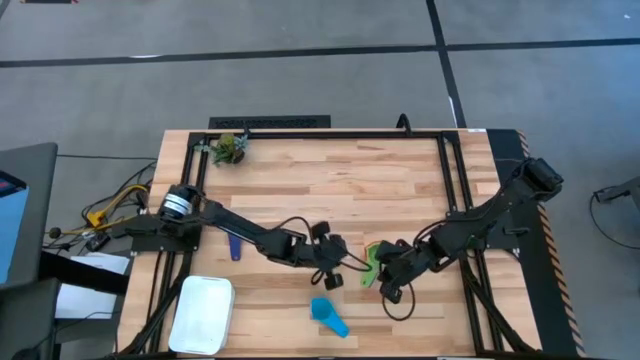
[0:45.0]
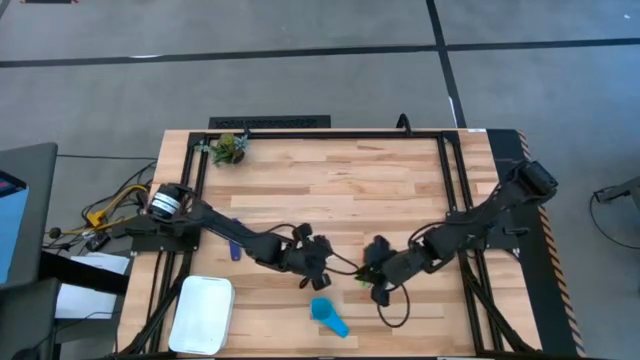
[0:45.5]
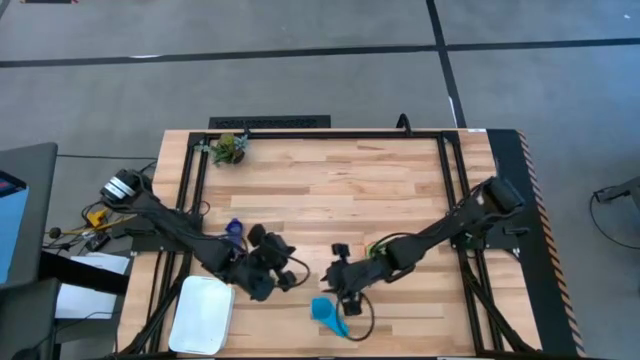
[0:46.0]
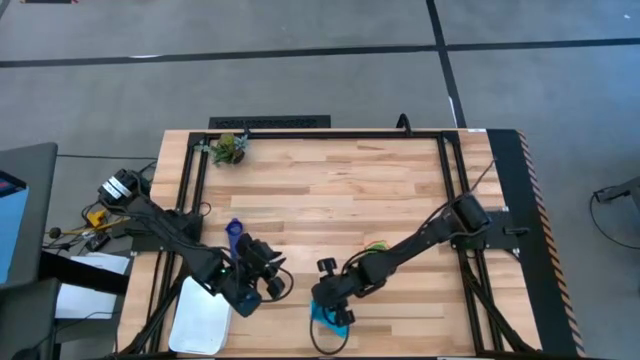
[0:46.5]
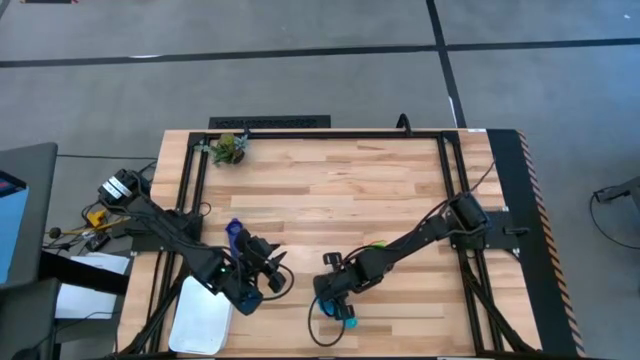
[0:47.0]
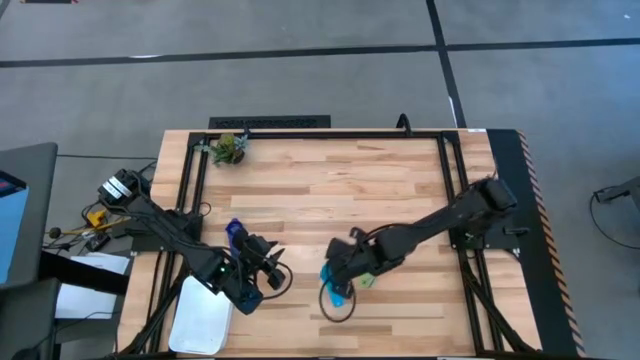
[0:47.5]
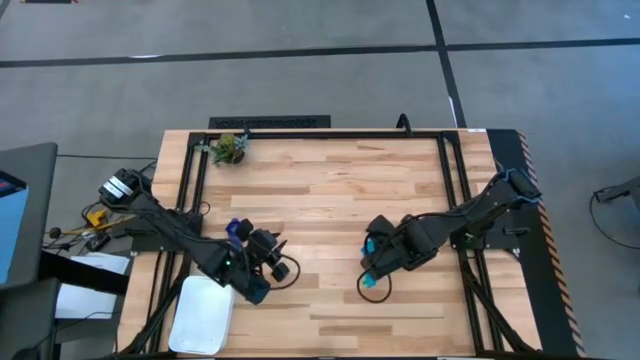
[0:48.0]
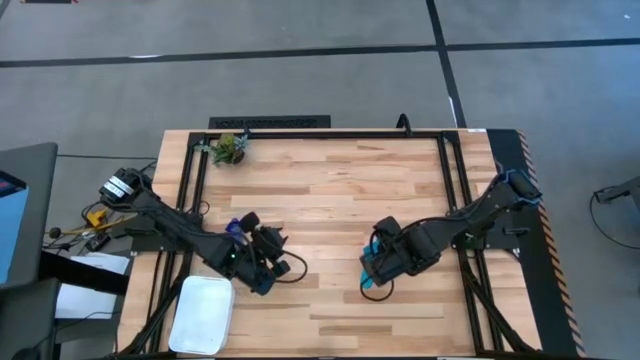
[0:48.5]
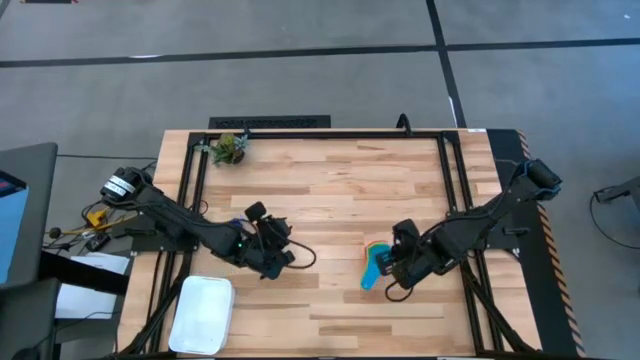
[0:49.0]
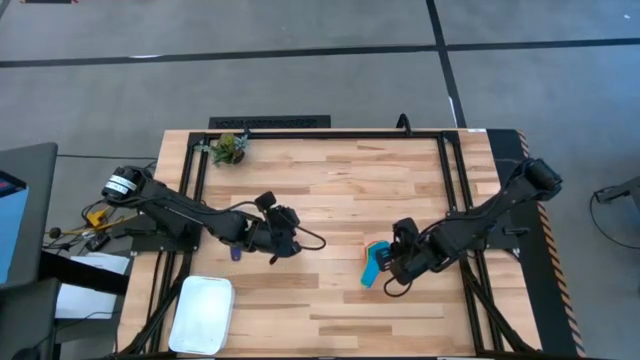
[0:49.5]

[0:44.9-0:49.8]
Task: Nest measuring cups in basket
Stack the light blue measuring cup on top of the green measuring cup

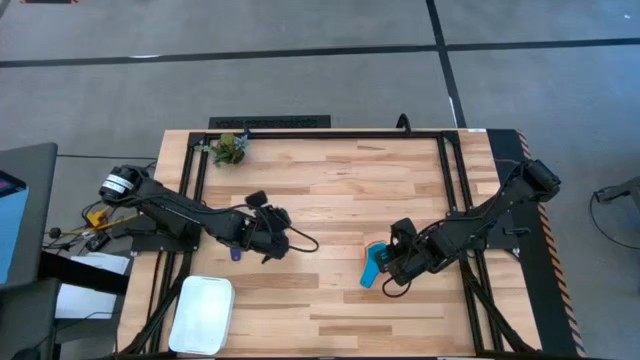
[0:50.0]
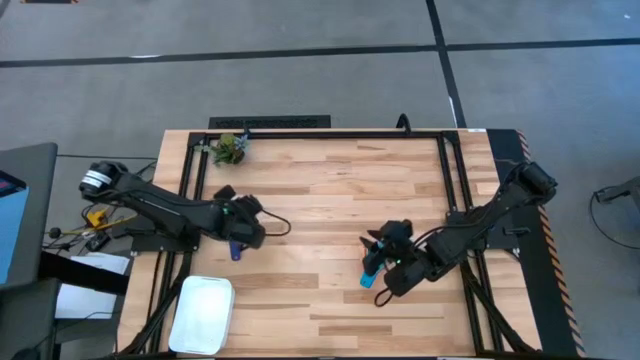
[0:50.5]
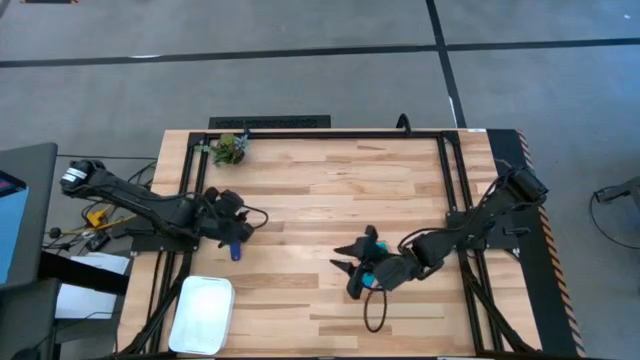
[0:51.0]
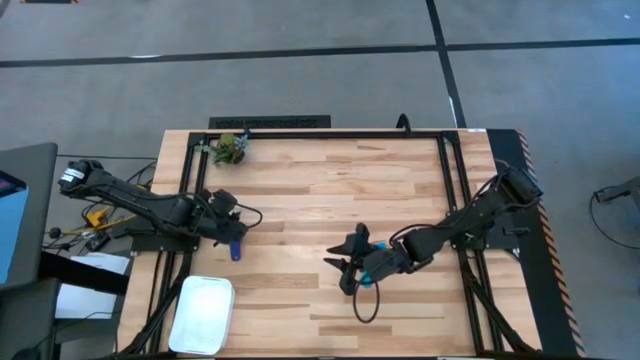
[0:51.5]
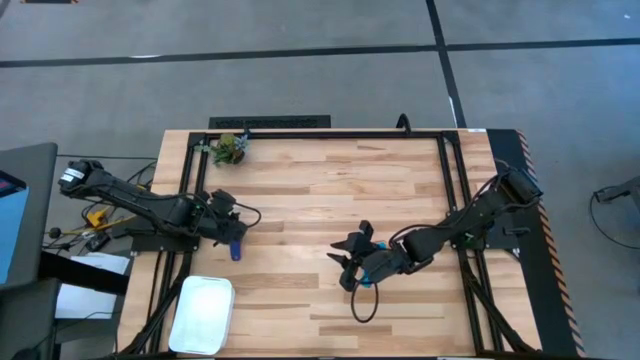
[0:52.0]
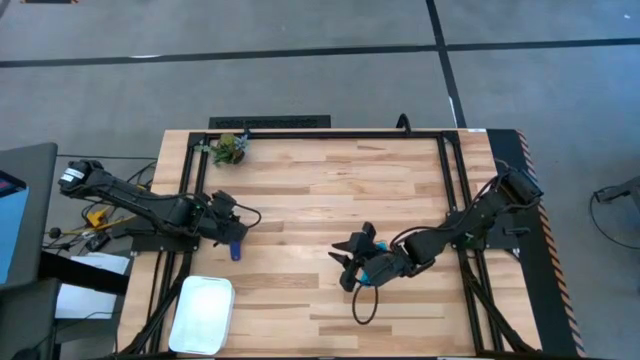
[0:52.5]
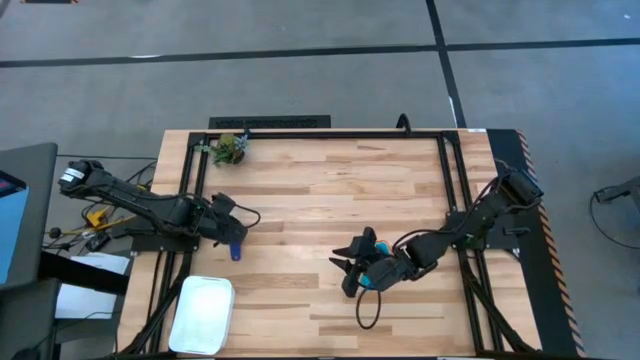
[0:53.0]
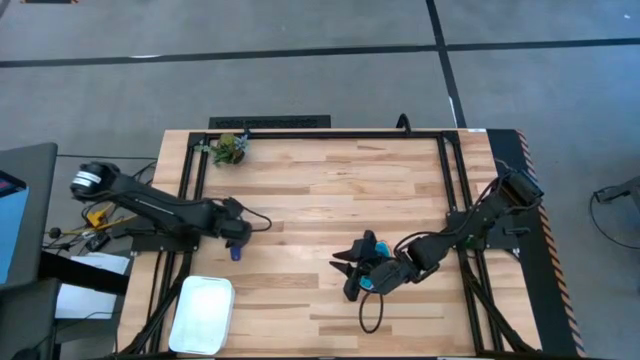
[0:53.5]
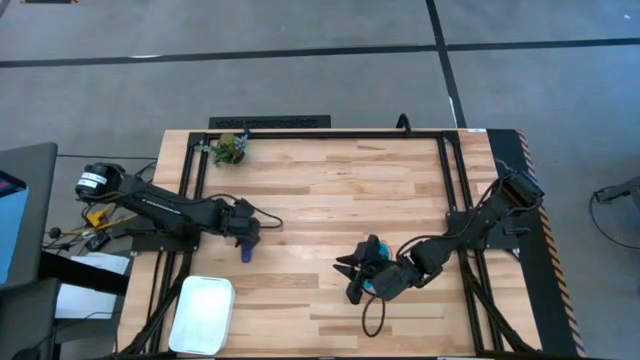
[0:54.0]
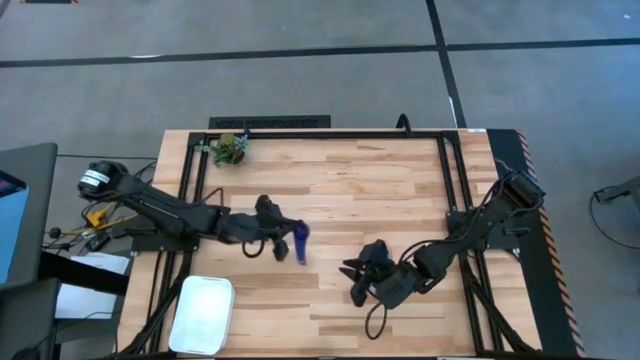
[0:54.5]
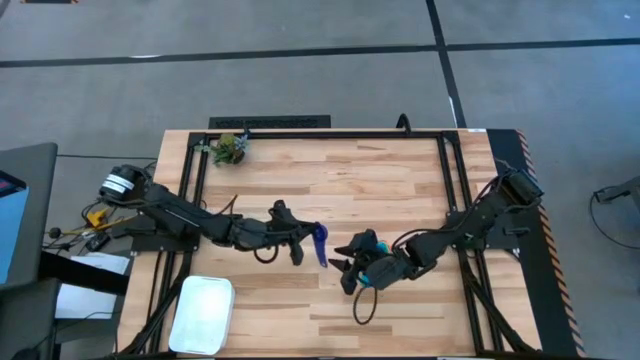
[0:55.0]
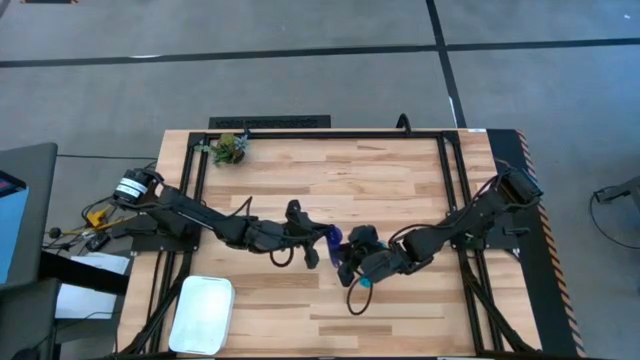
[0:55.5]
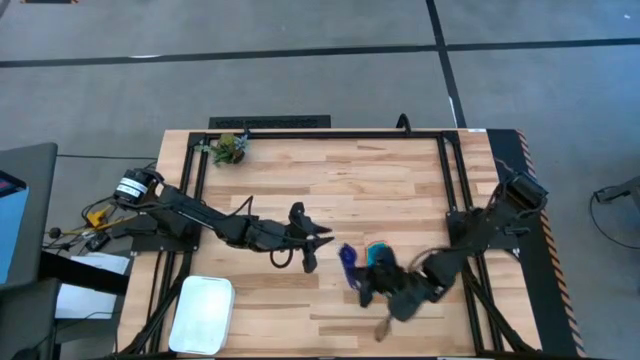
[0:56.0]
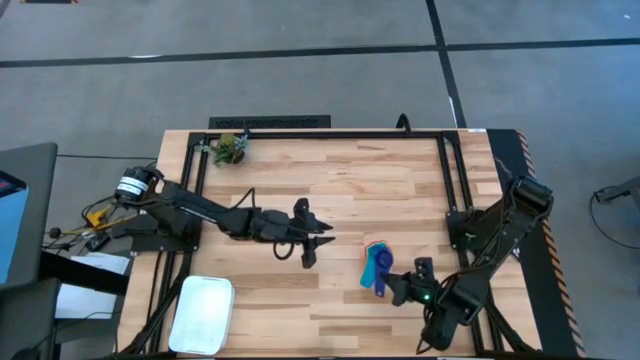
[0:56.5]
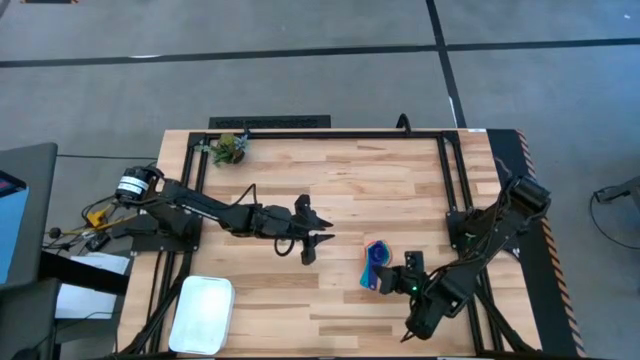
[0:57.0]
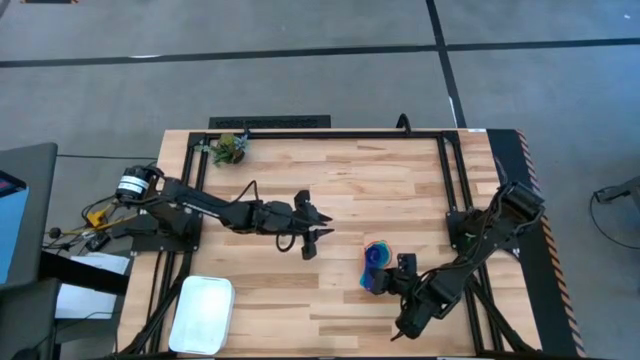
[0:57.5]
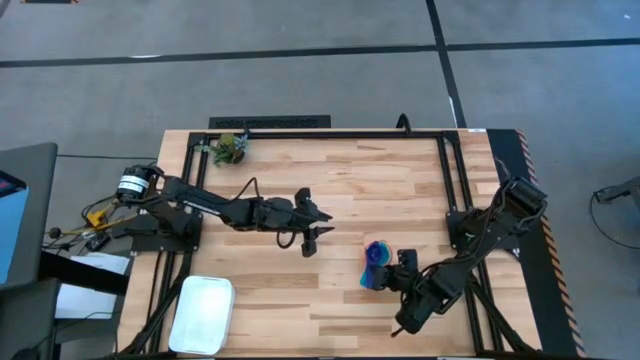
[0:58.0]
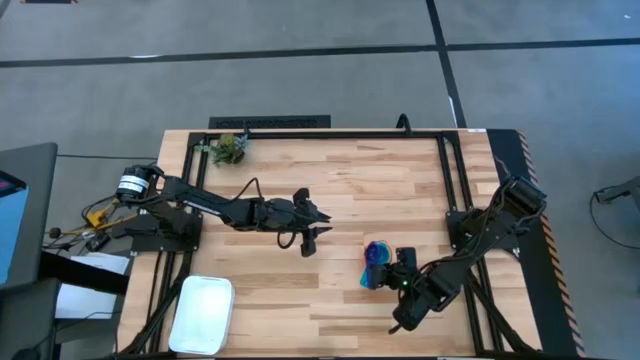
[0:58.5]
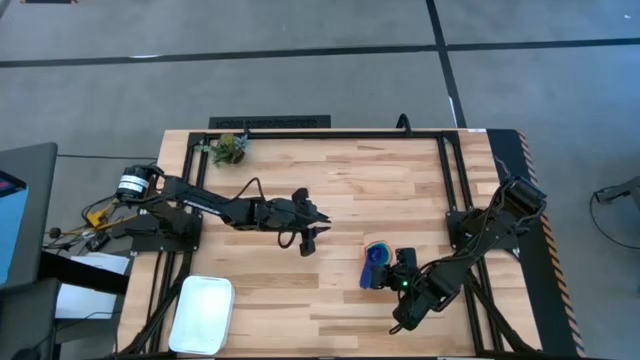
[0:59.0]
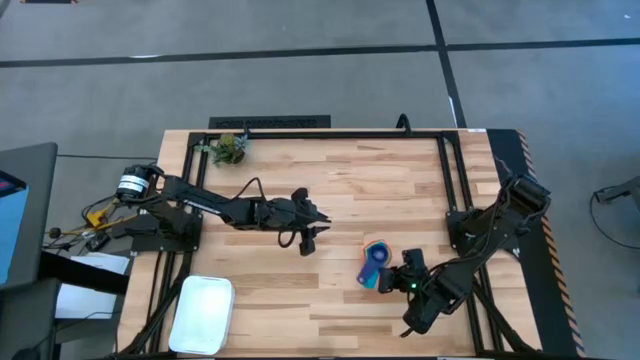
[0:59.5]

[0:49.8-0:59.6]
Stack the dark blue measuring cup on top of the light blue measuring cup

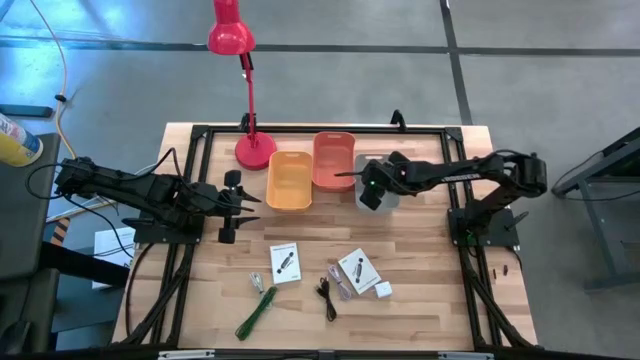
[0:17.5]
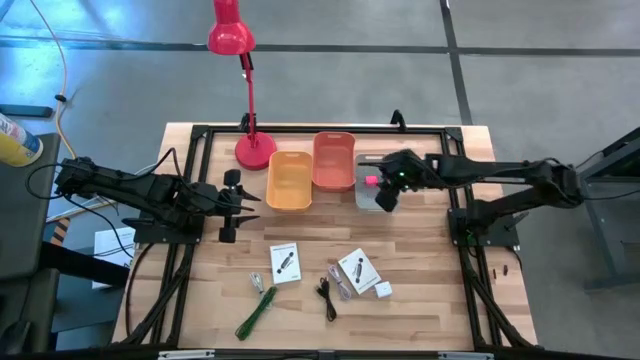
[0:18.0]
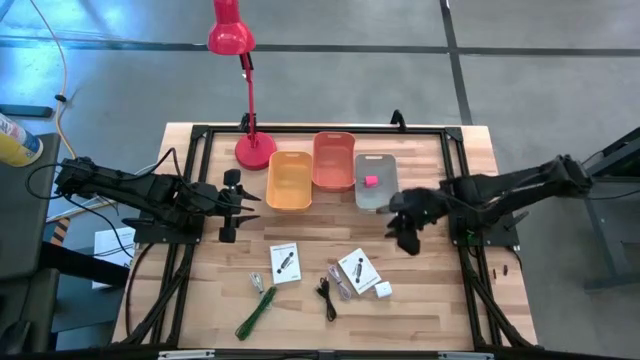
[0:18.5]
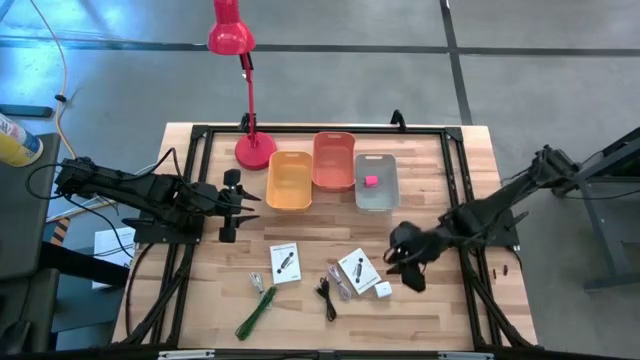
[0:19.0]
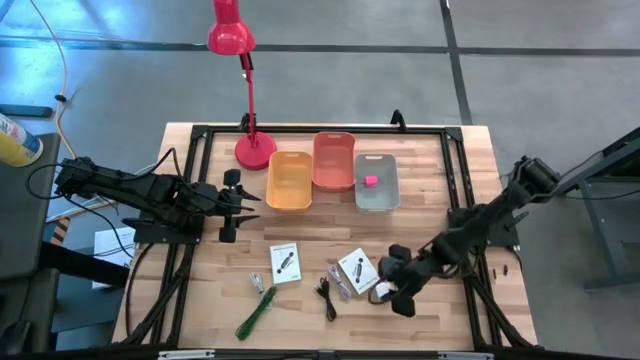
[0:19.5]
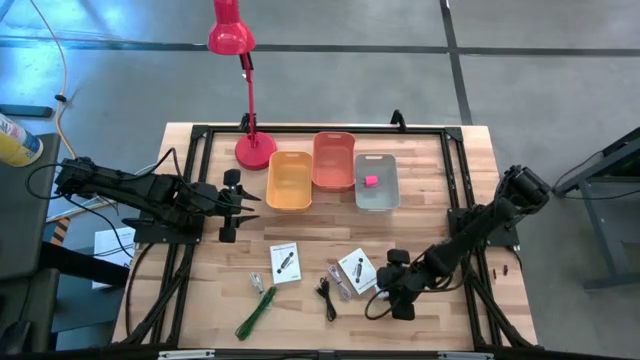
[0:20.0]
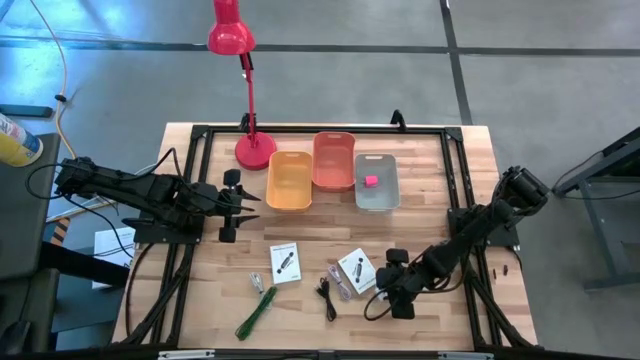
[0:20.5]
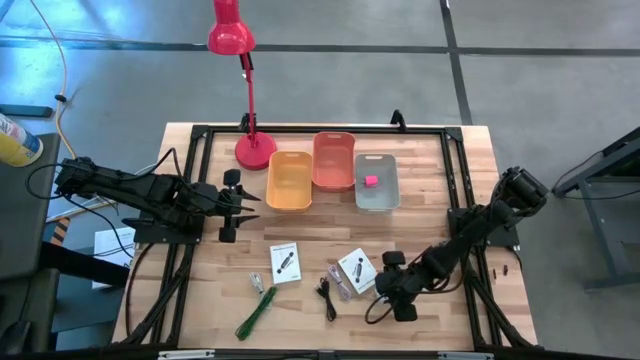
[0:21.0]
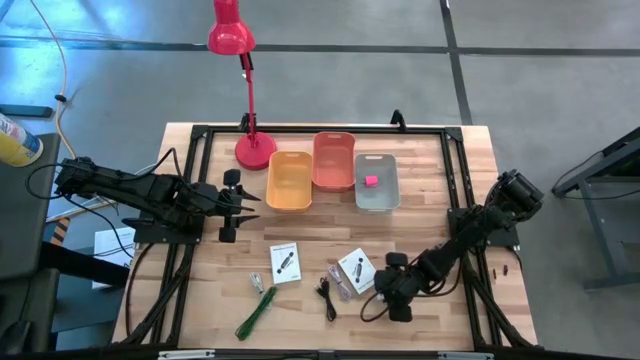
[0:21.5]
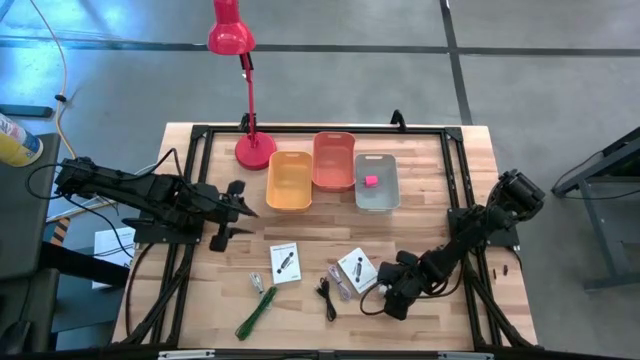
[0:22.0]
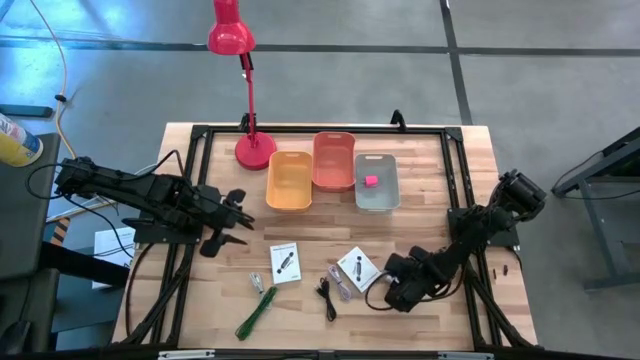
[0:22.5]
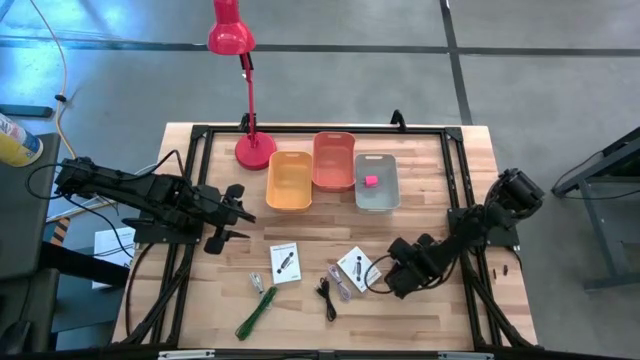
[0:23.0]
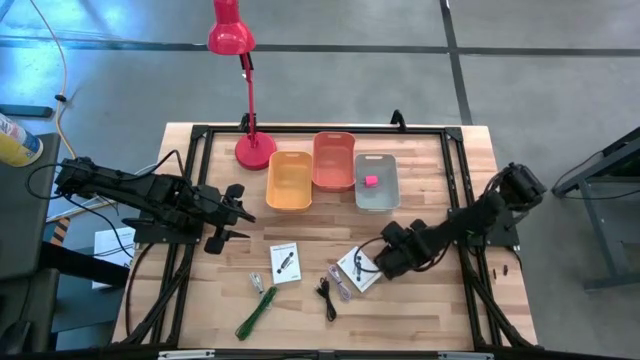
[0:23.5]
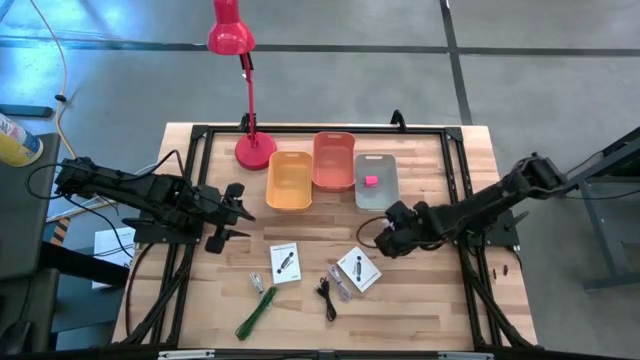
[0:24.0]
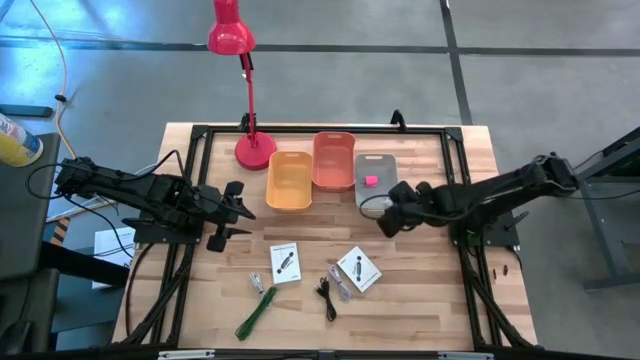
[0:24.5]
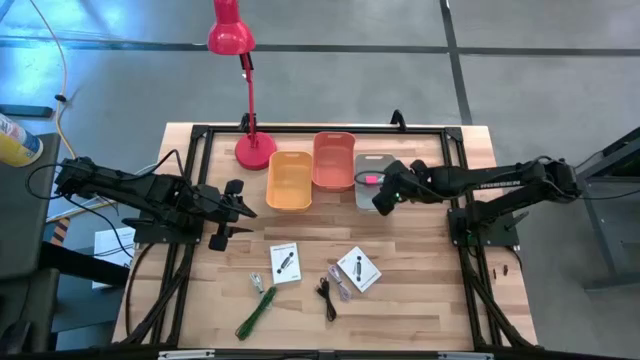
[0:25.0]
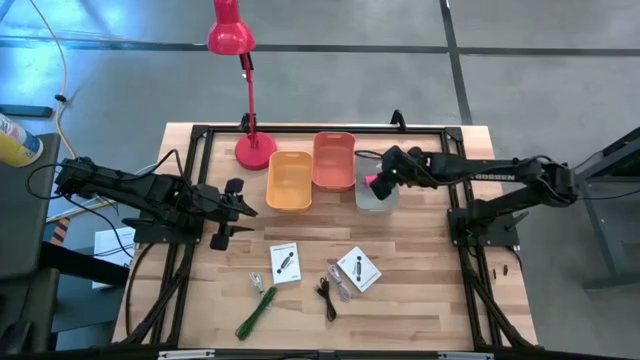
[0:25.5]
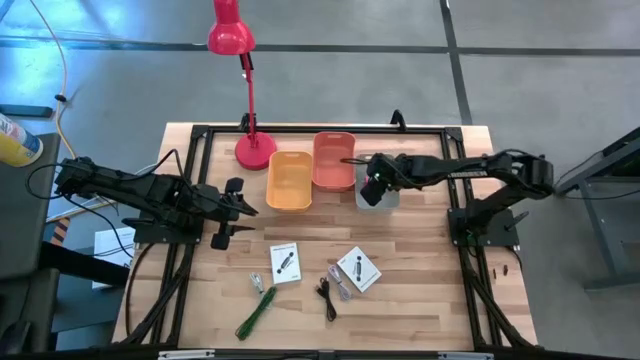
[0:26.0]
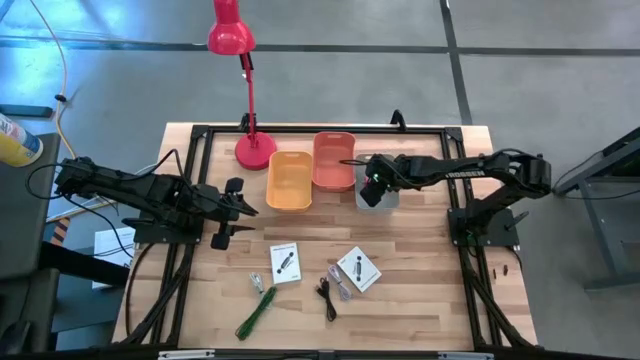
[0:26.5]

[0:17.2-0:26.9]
Task: Pick and place items into bin
Put the white charger adaptor into the gray bin
